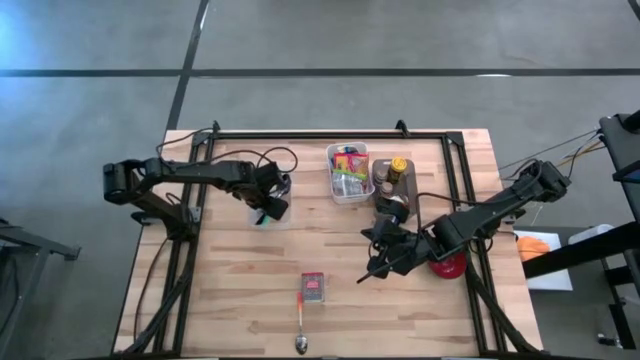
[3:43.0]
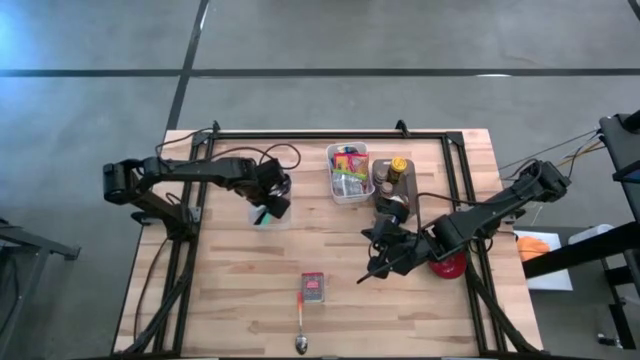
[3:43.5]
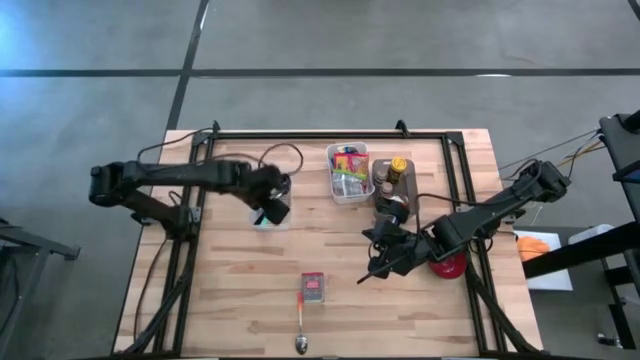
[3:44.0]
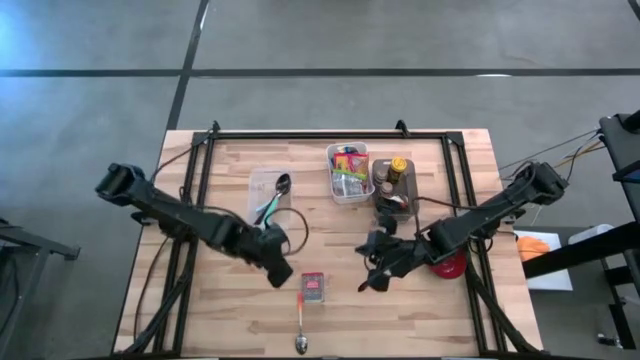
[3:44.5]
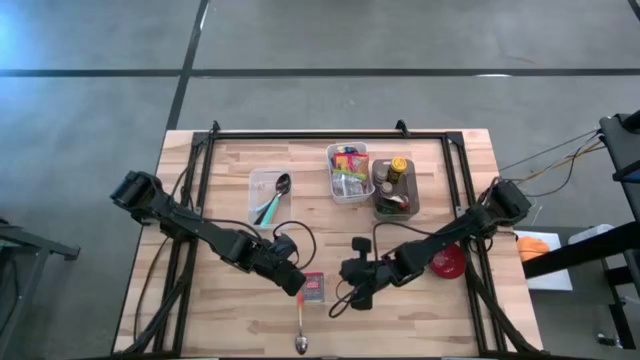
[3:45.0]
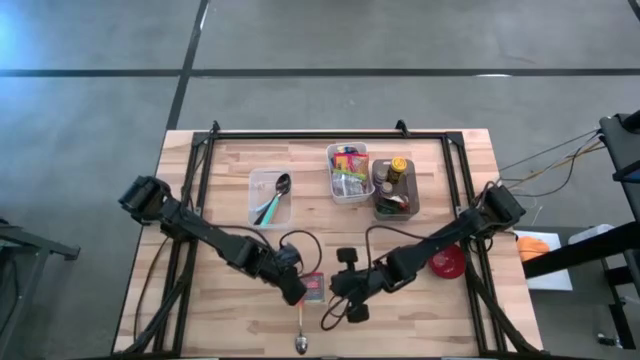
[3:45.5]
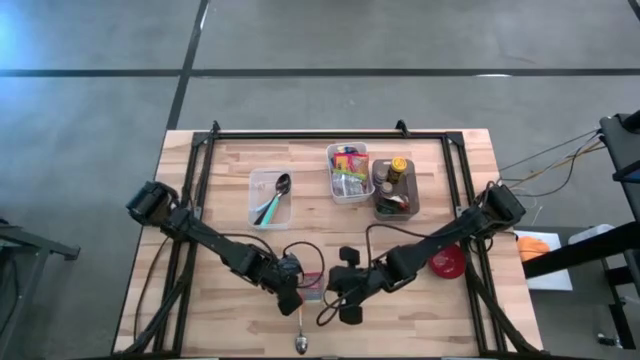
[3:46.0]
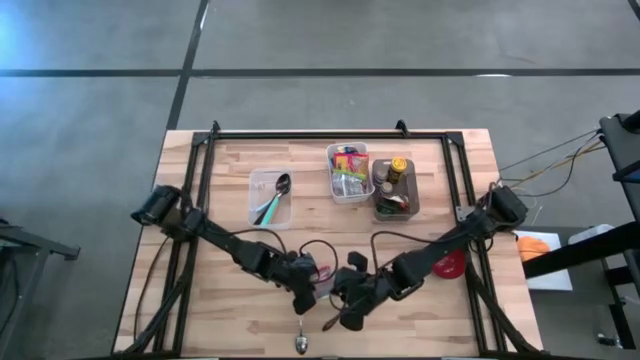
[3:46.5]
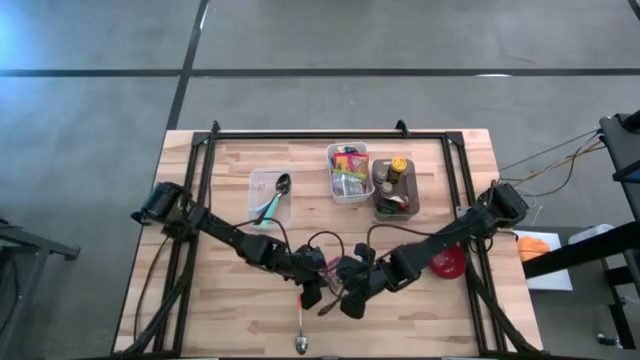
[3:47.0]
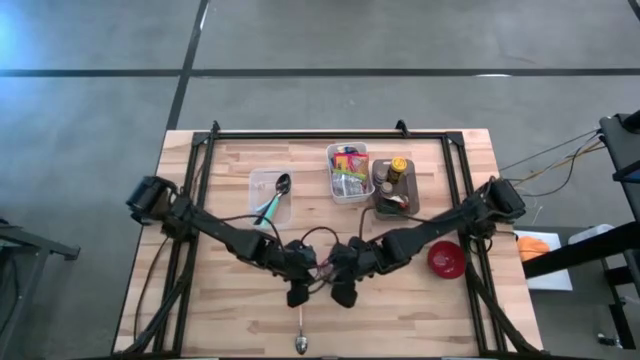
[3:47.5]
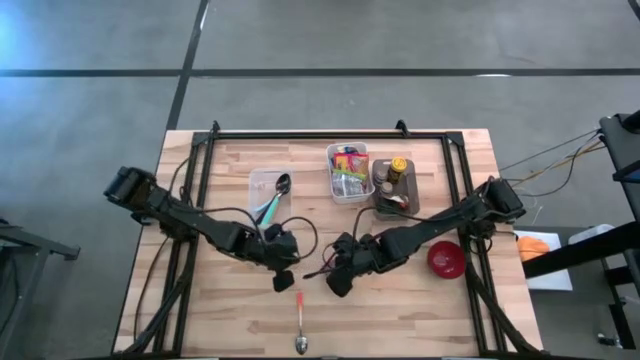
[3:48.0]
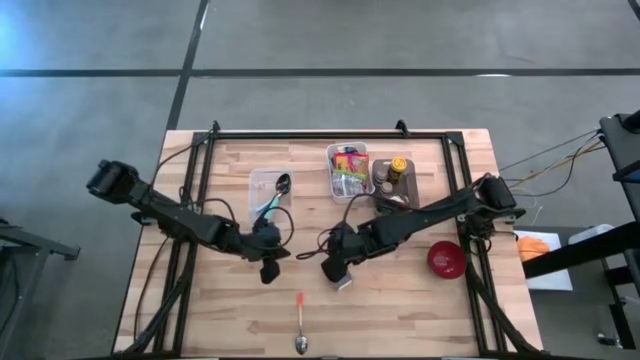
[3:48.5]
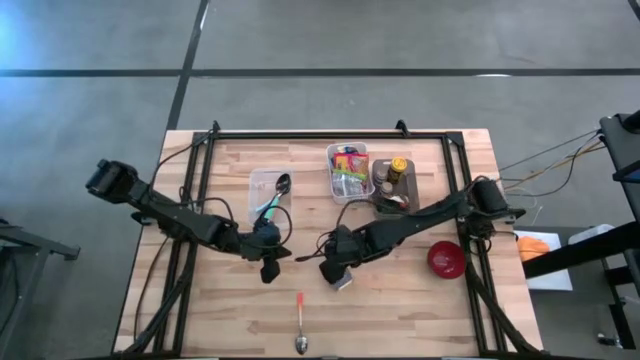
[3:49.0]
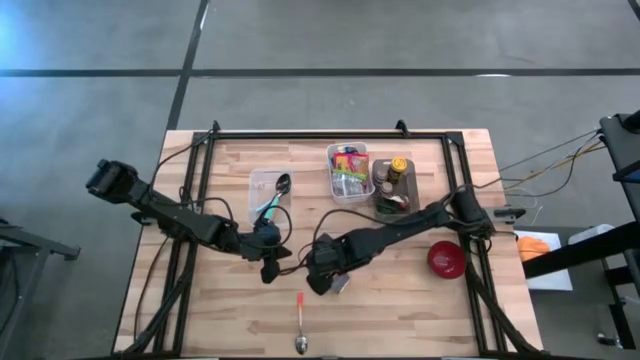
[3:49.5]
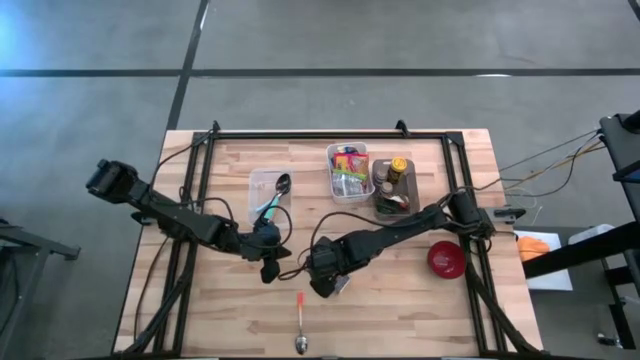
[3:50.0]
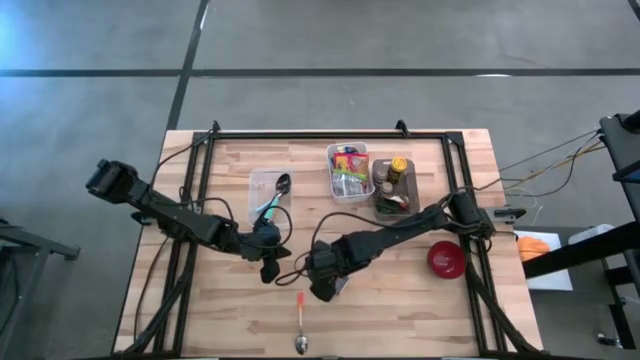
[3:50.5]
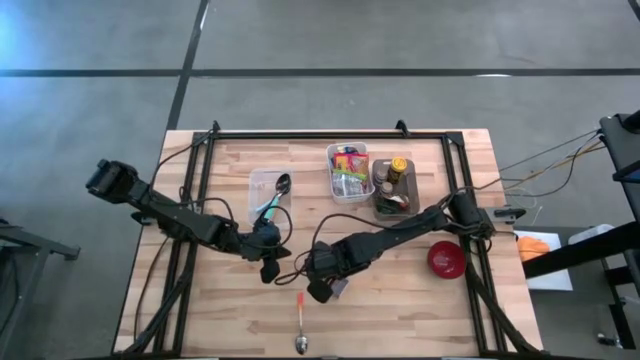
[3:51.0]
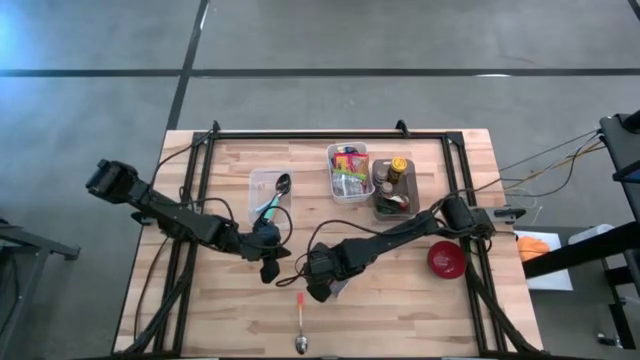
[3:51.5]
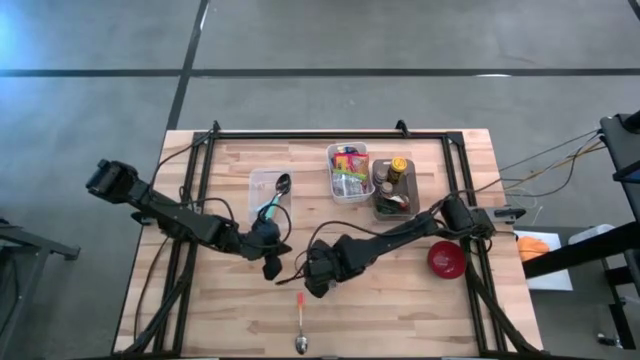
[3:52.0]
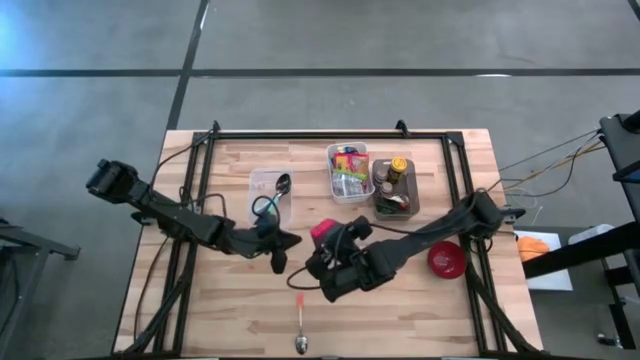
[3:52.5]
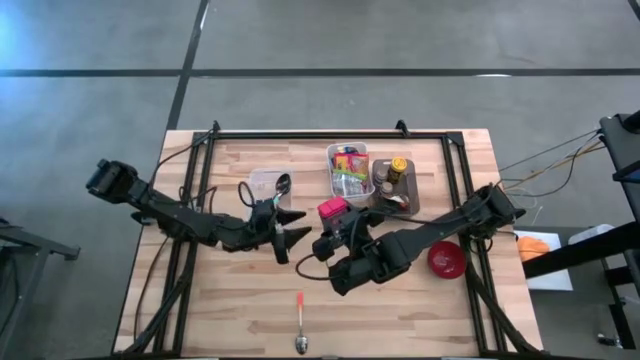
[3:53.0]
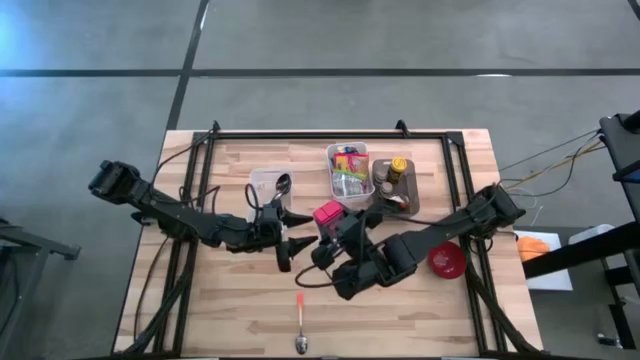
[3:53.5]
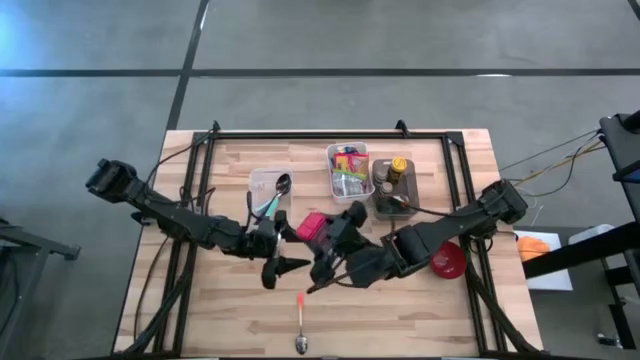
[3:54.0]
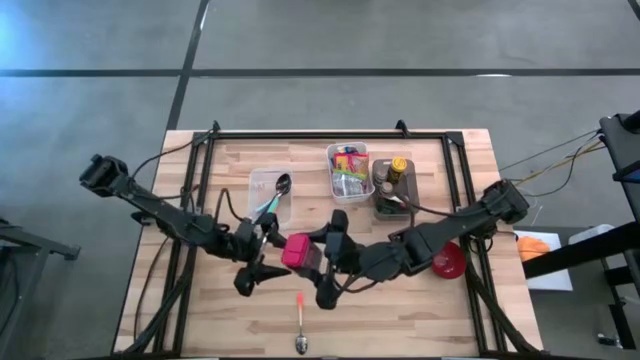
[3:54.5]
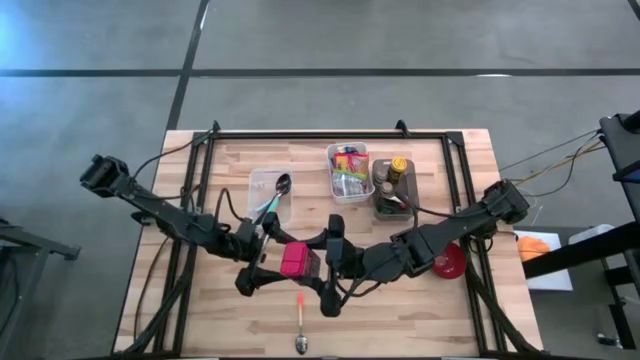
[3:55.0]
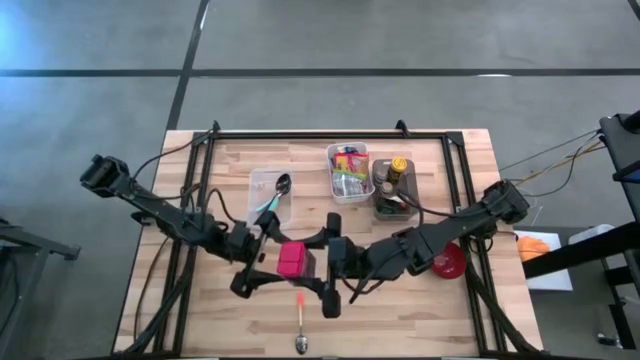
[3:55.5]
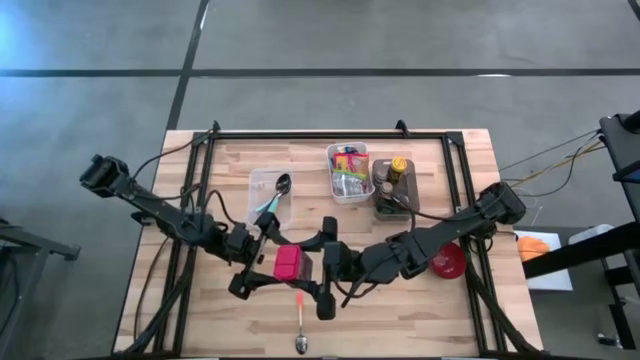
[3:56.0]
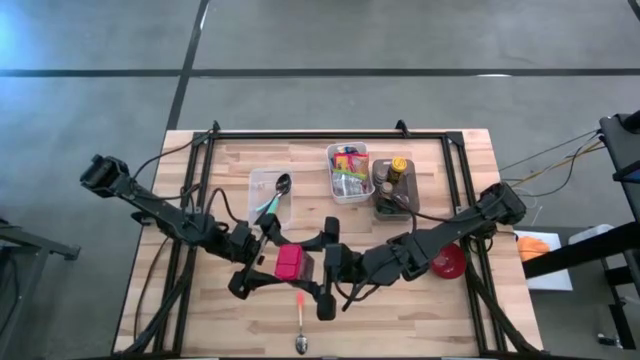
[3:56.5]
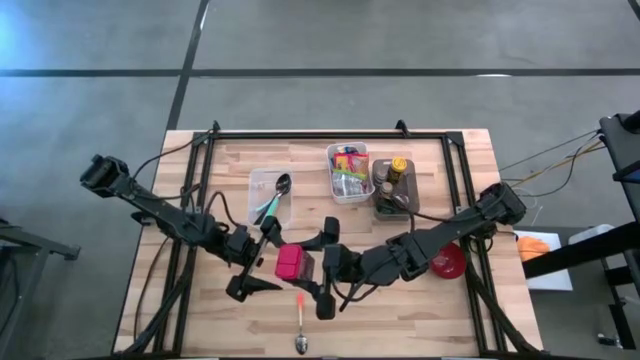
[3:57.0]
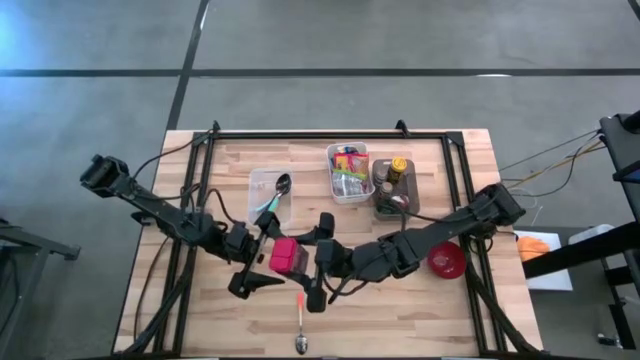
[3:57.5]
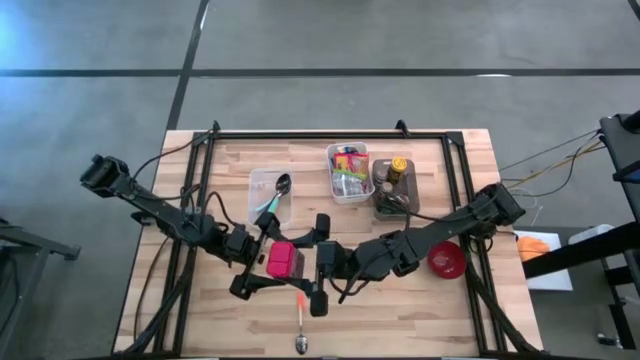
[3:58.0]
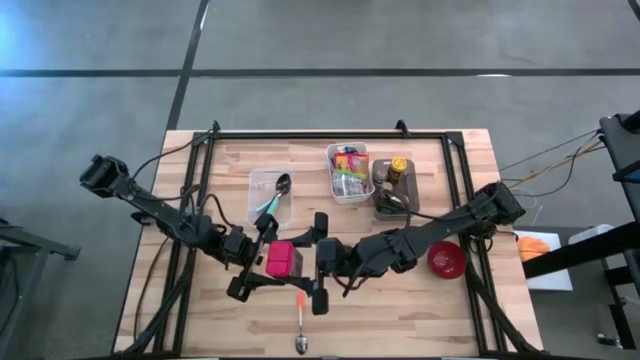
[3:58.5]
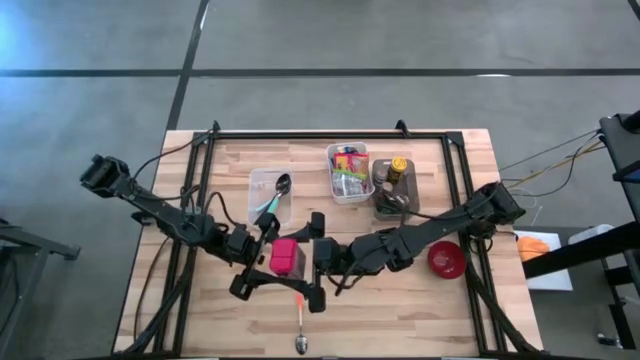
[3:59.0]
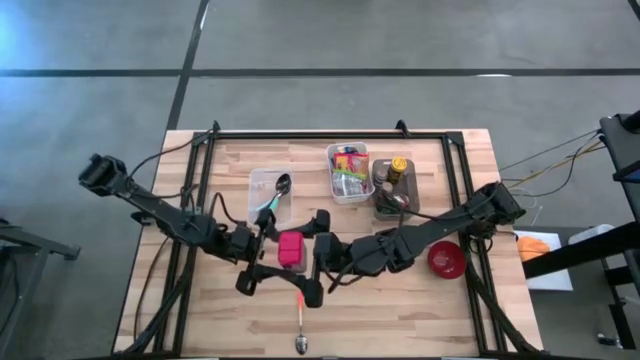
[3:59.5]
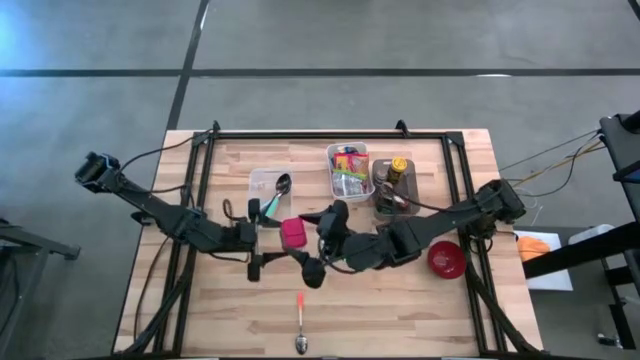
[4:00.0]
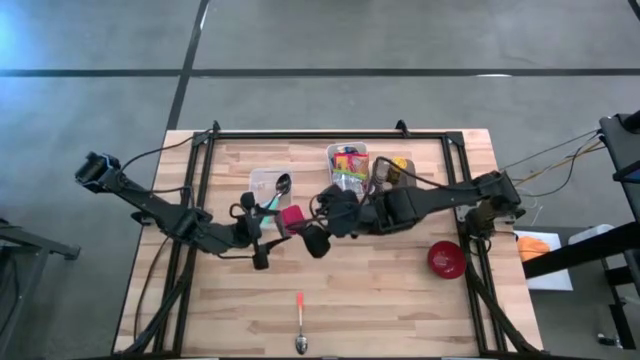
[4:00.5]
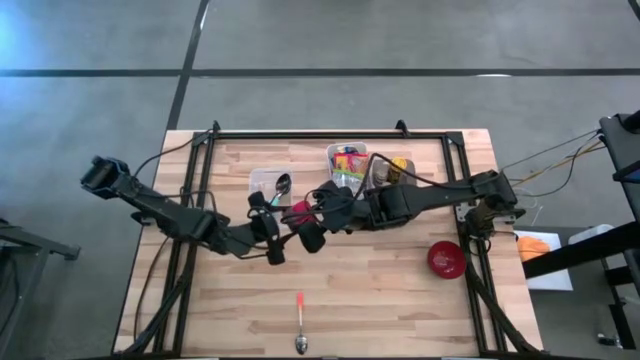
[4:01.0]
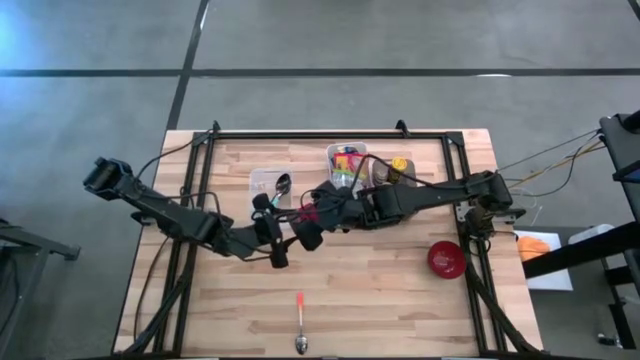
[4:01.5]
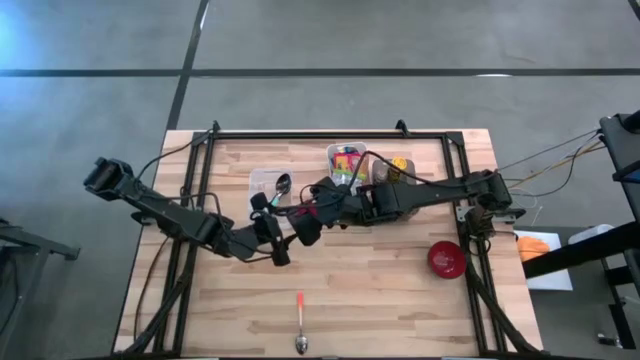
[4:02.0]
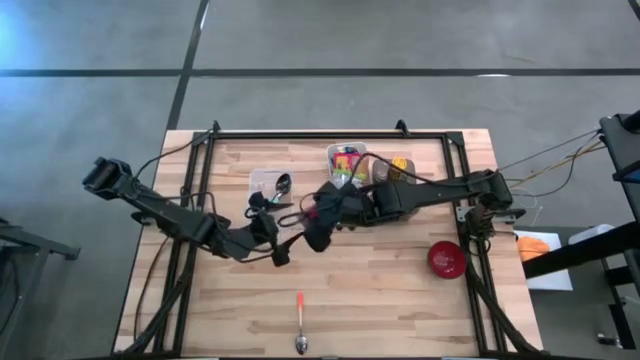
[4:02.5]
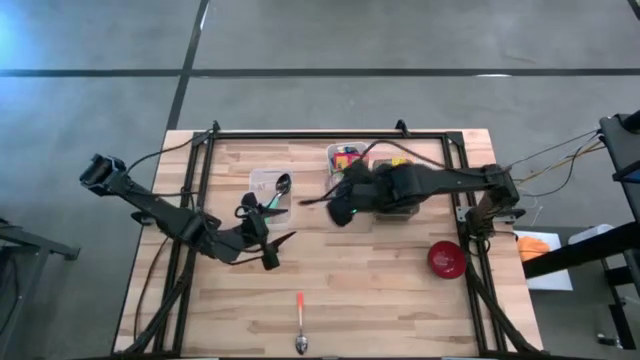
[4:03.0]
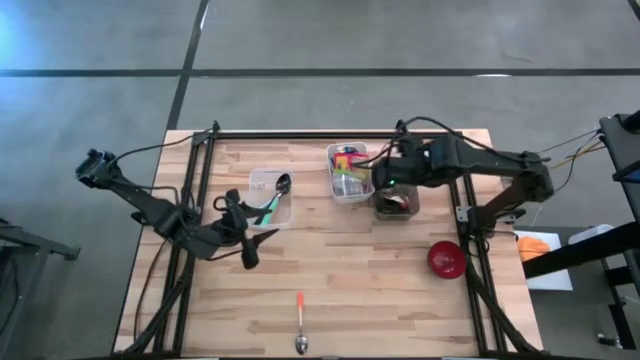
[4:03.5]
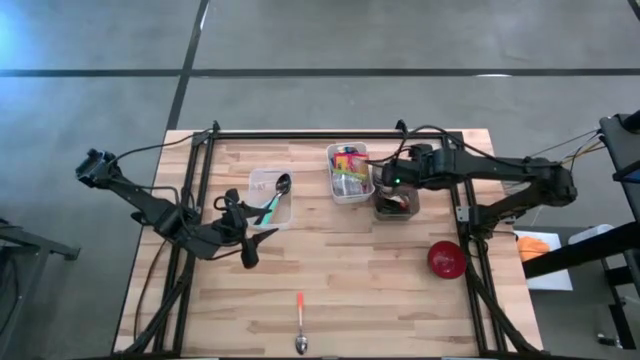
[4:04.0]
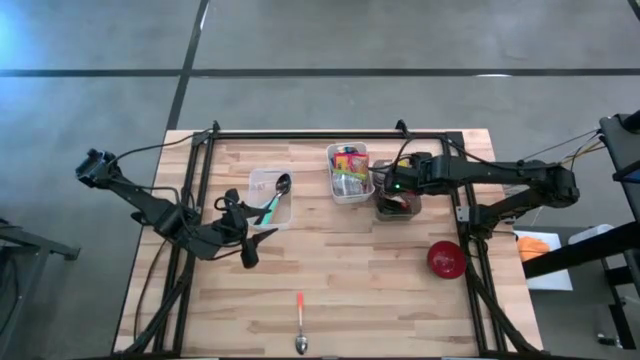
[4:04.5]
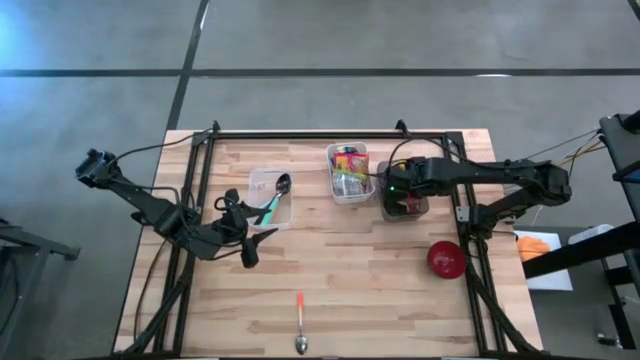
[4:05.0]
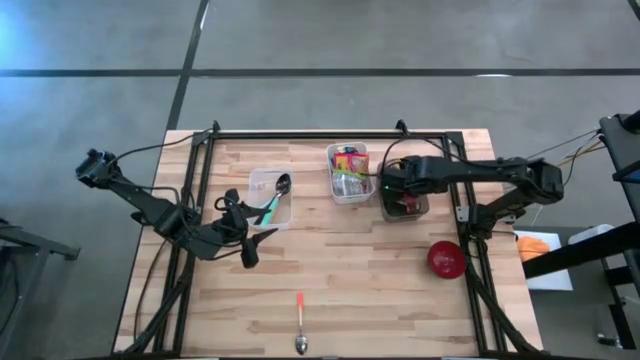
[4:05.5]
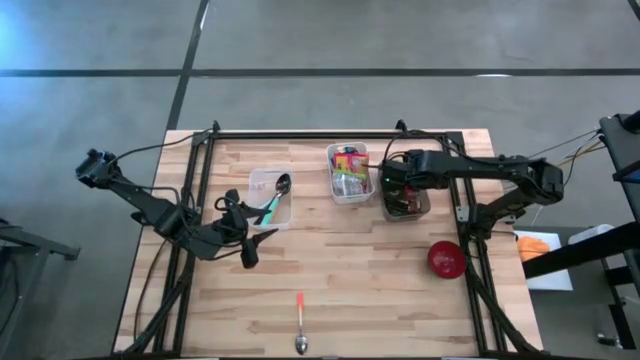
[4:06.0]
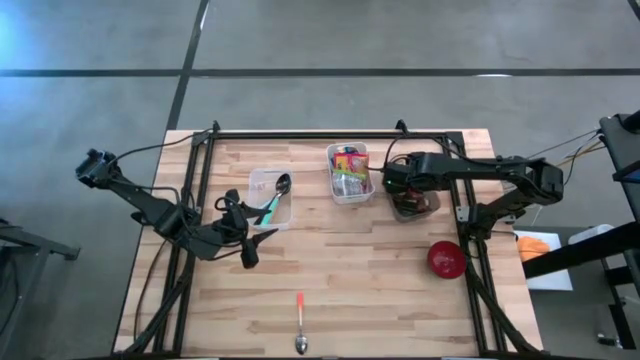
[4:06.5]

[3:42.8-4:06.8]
Put the red seasoning can into the black bin
